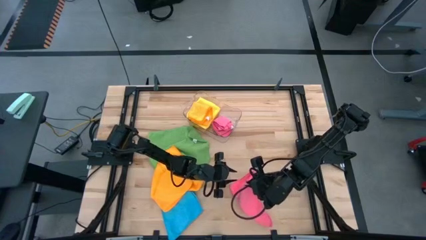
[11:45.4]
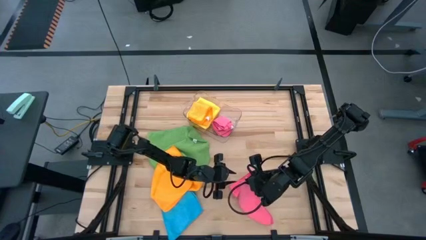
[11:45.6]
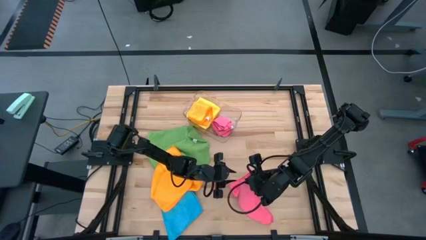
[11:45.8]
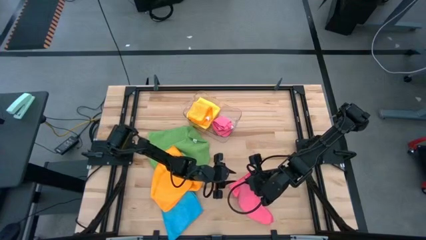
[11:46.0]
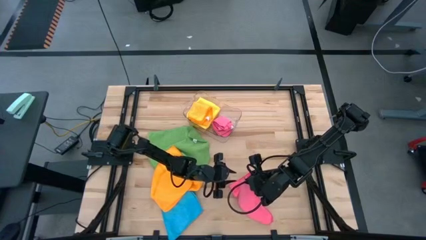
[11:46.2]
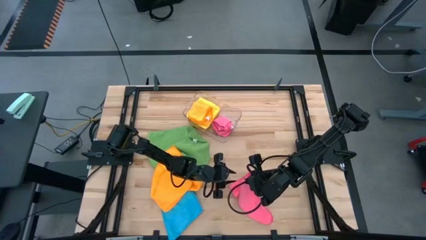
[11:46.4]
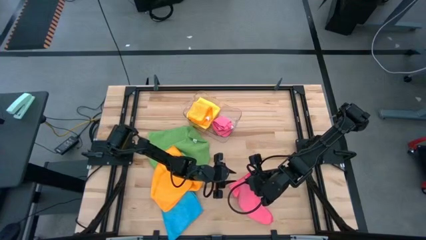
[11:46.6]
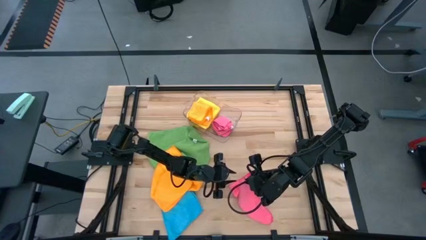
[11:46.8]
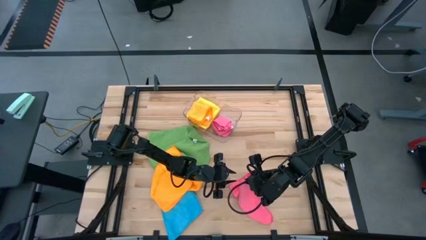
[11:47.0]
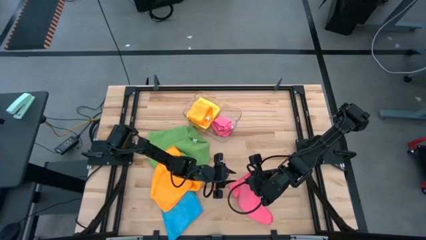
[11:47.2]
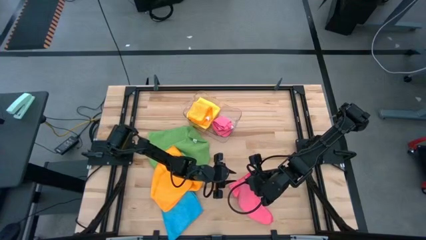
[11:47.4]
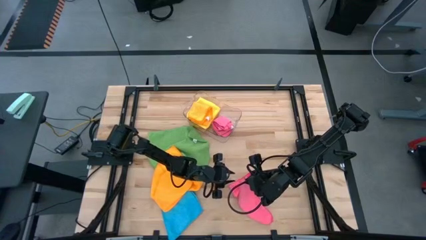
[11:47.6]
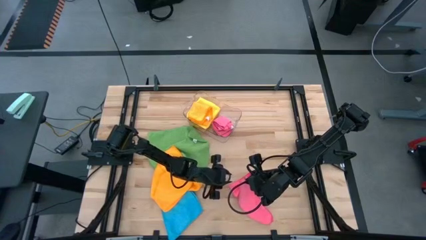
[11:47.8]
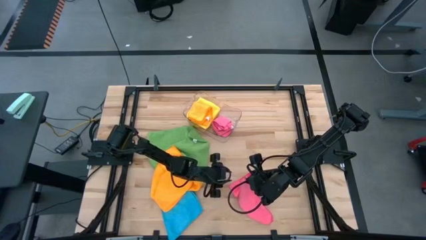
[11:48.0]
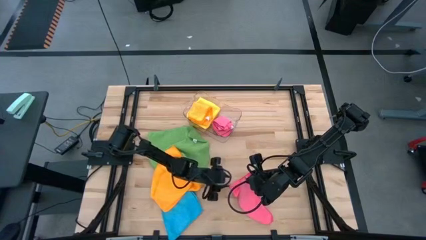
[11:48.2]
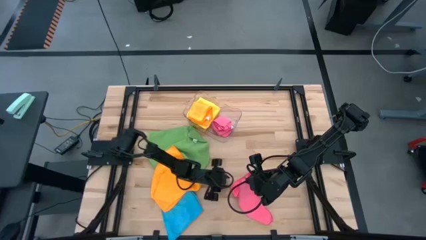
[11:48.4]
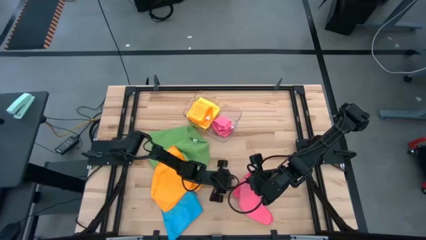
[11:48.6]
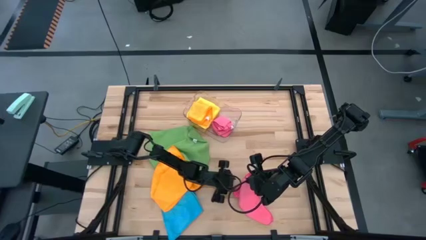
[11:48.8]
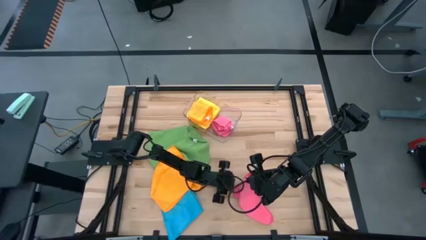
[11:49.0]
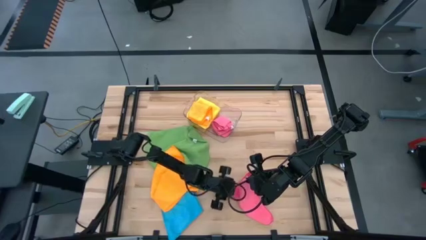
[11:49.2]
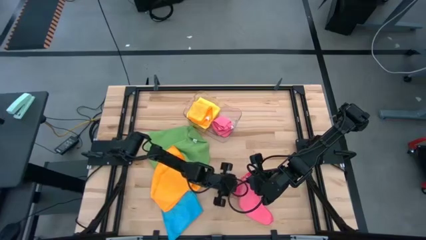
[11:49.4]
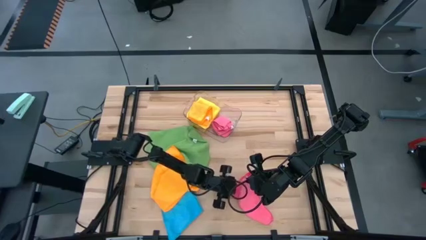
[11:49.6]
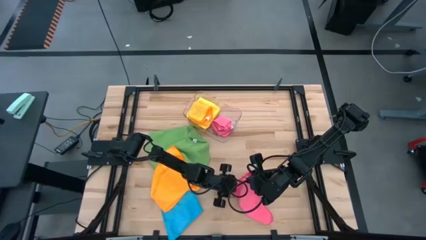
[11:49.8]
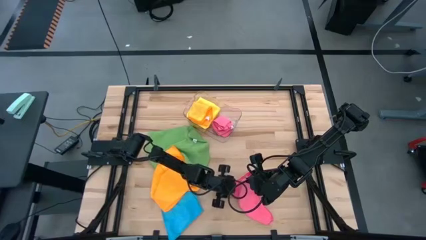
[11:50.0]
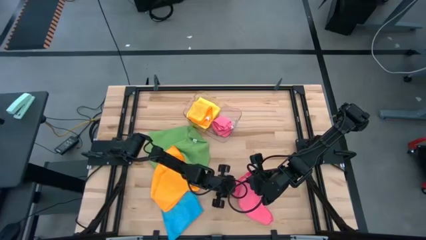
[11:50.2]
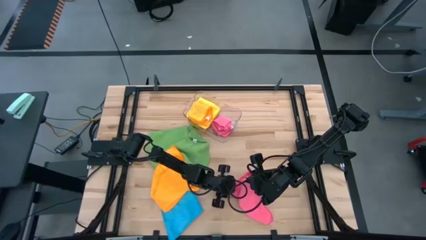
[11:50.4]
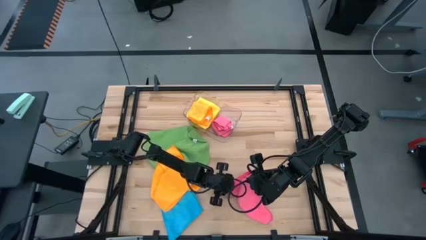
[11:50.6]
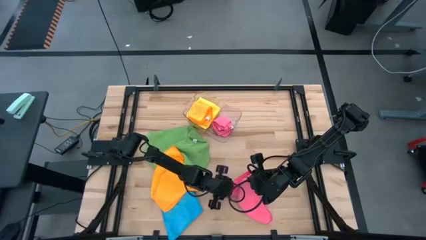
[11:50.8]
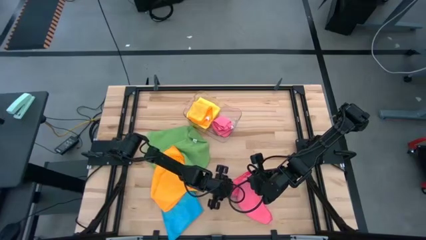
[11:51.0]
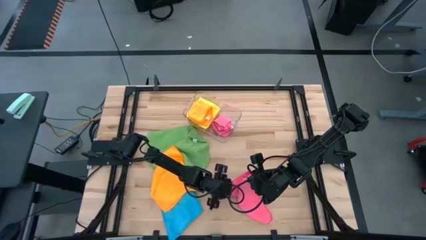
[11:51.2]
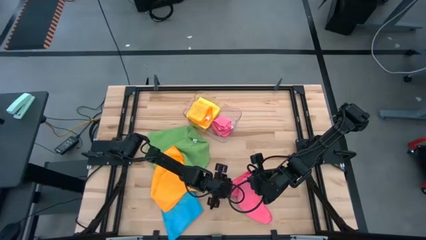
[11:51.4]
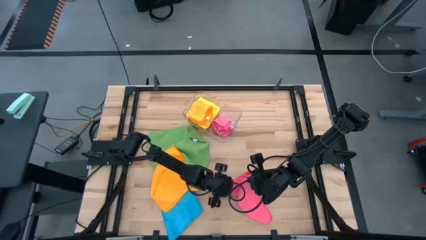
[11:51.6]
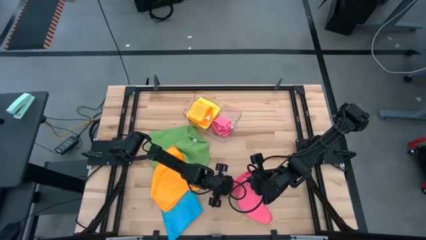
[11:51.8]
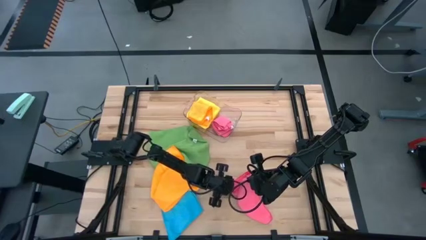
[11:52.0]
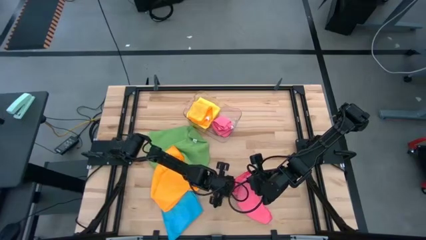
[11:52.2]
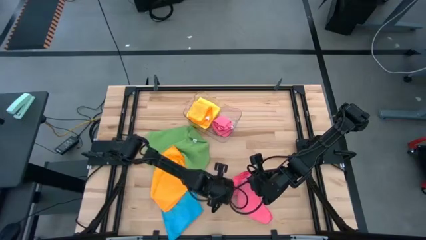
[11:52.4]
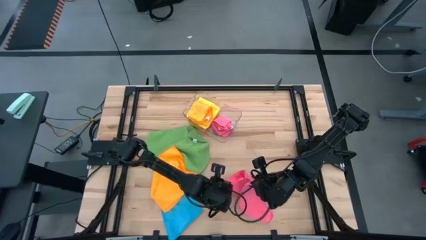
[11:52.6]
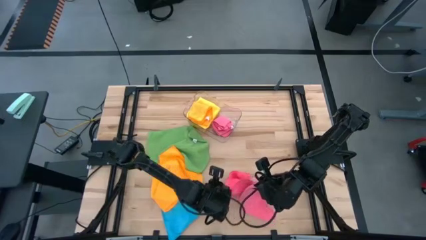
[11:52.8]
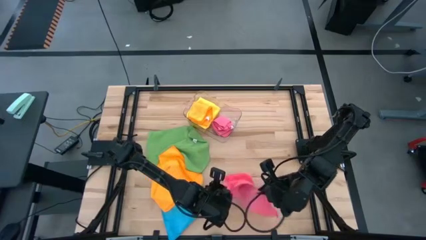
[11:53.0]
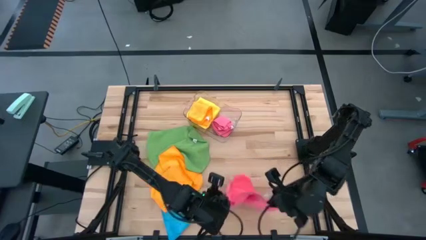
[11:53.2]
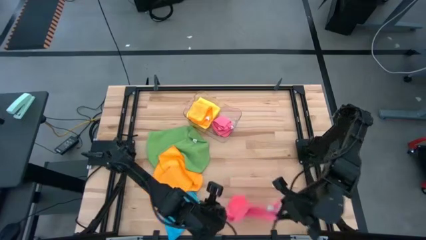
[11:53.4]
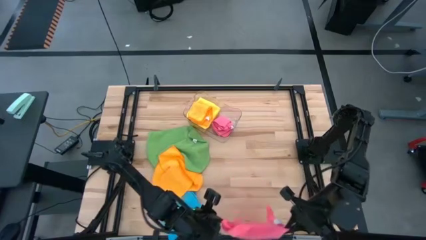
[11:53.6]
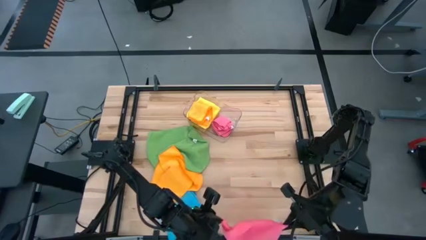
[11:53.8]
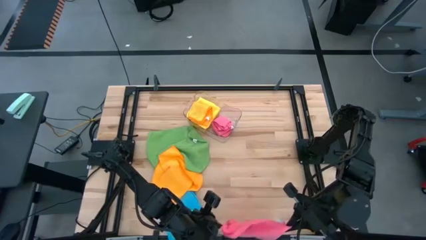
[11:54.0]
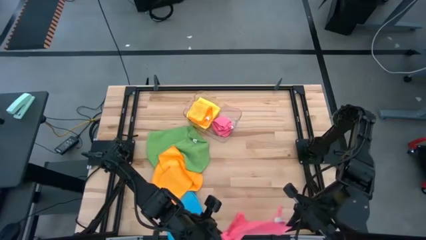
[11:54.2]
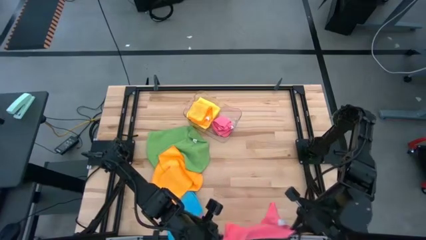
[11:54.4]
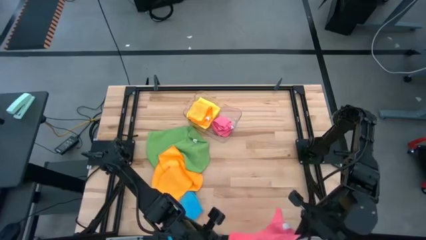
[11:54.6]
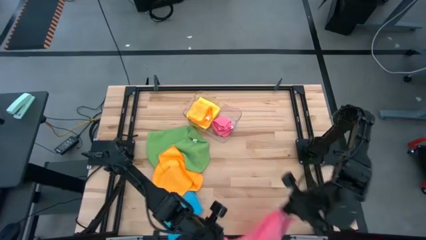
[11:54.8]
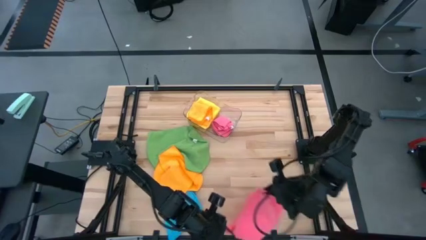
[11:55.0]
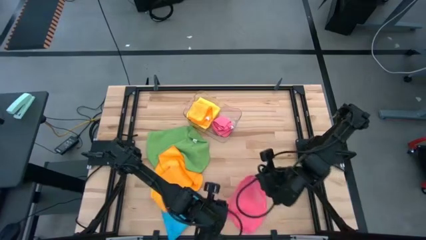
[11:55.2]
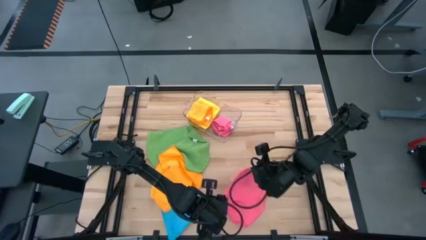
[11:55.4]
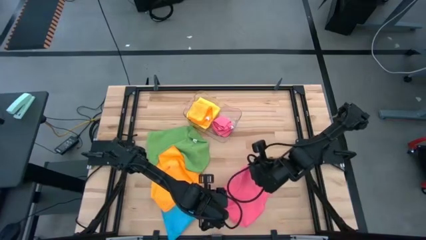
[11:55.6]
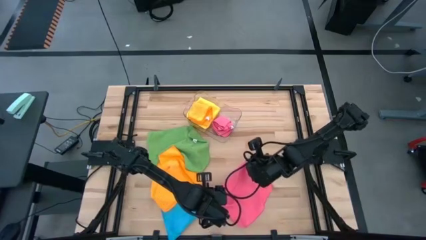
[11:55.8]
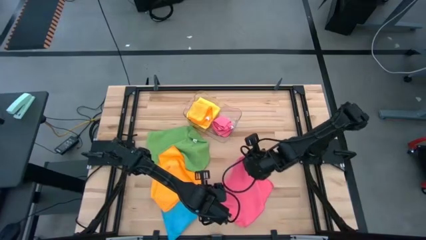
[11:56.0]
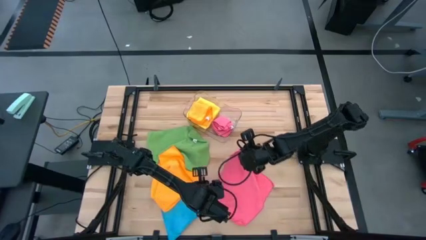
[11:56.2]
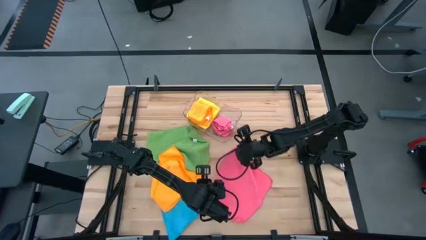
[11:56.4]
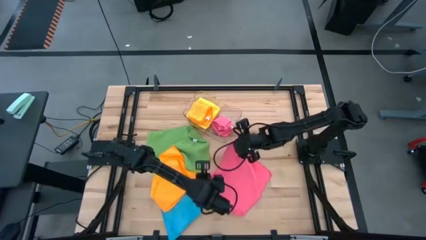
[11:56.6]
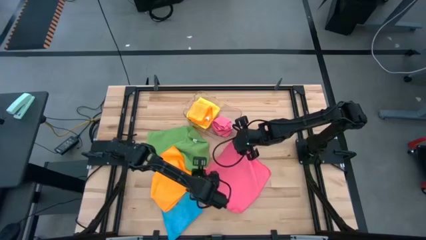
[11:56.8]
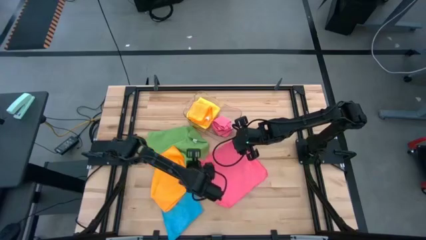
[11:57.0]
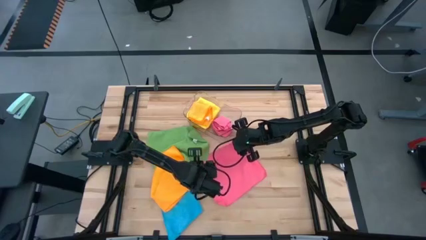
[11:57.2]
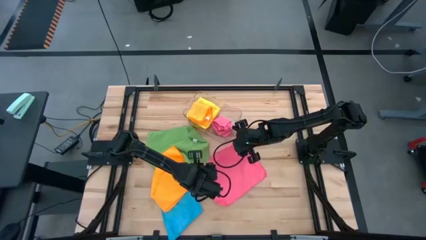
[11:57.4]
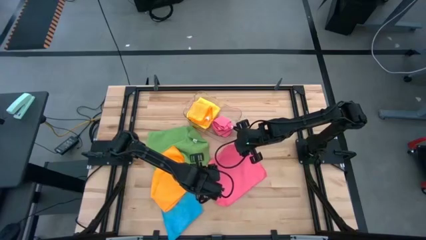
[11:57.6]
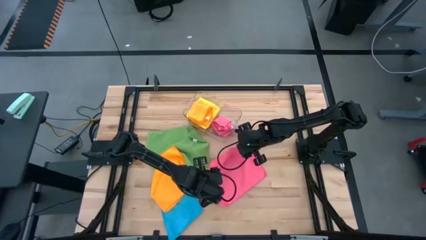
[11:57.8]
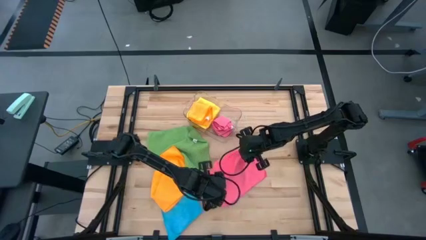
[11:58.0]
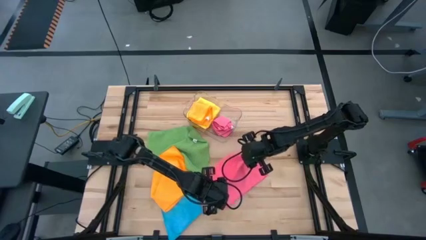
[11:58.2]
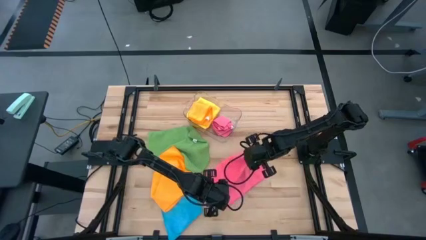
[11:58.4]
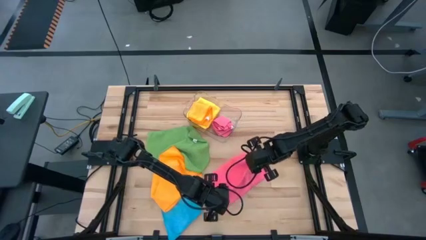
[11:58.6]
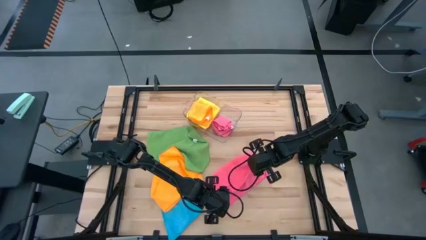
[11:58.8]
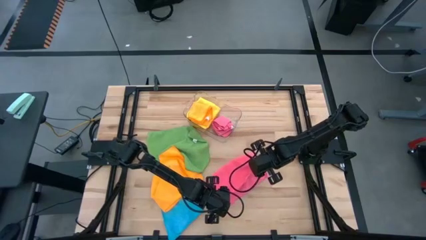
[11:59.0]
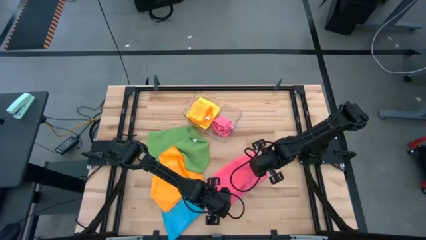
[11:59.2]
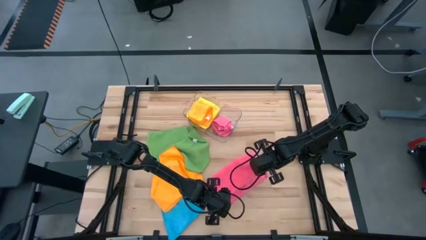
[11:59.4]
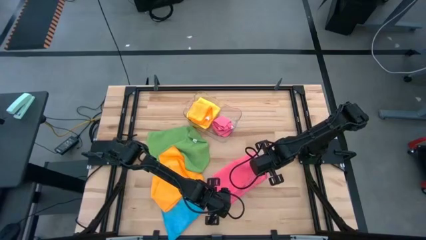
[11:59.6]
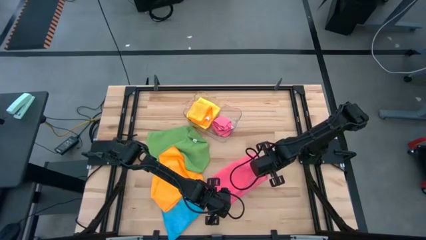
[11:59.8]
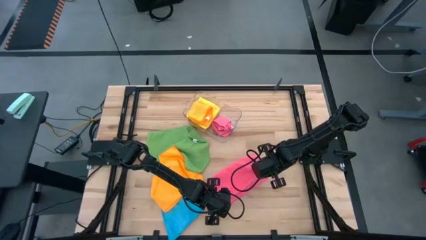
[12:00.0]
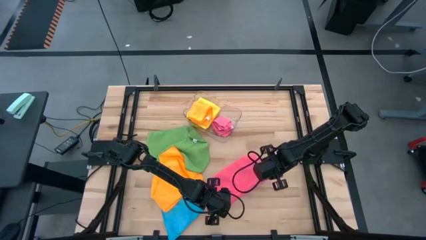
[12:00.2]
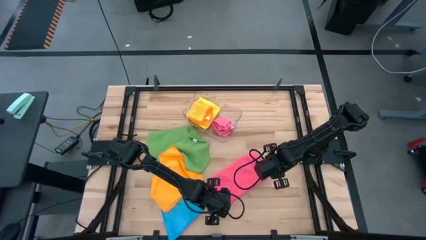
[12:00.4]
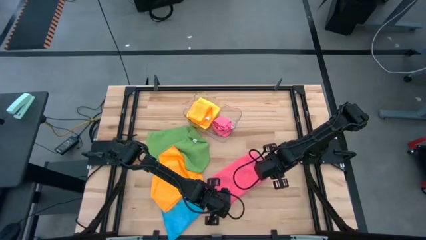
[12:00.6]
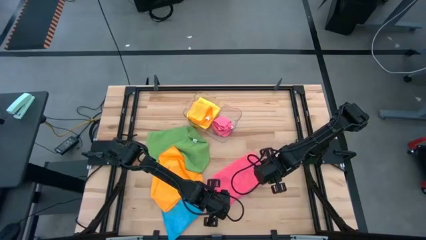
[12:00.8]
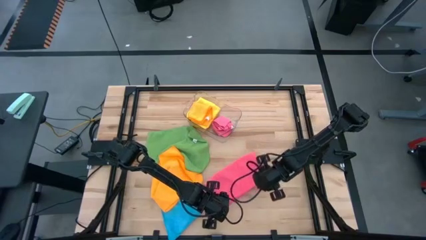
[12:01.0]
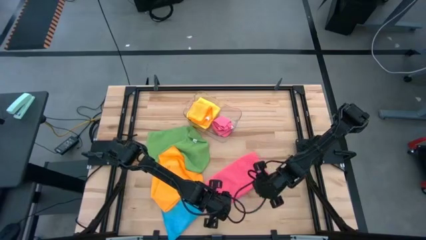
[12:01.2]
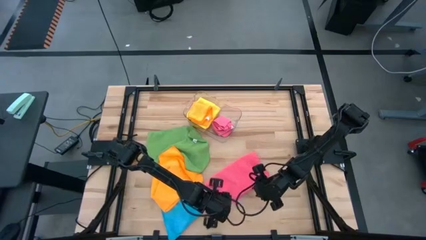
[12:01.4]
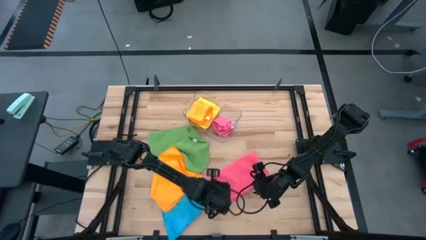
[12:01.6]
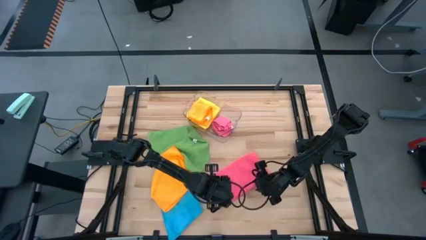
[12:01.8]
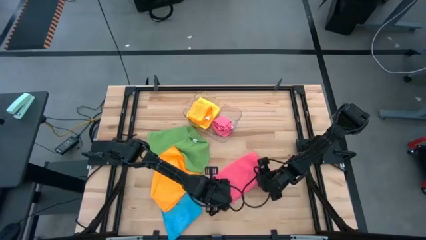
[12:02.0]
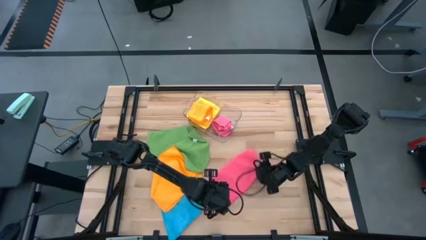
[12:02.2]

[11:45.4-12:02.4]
Task: Fold microfiber towels
Fold the pink microfiber cloth
